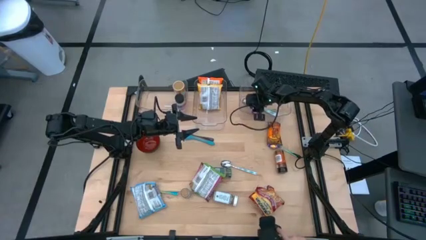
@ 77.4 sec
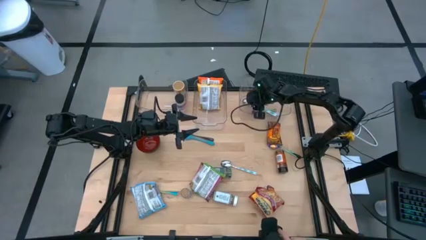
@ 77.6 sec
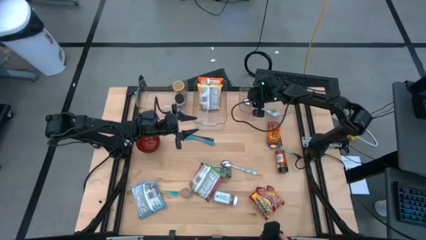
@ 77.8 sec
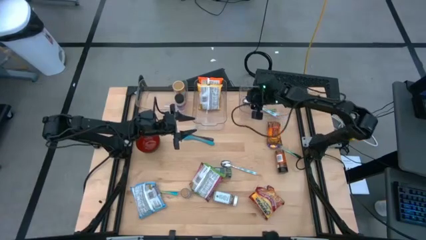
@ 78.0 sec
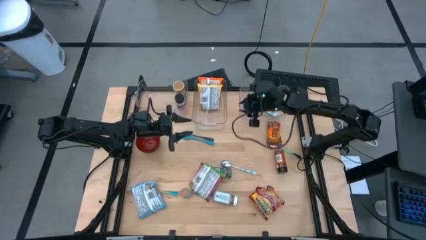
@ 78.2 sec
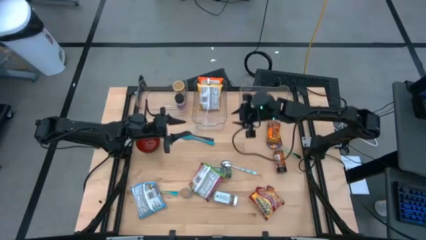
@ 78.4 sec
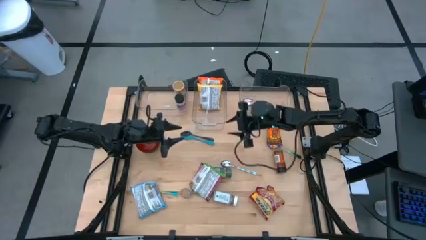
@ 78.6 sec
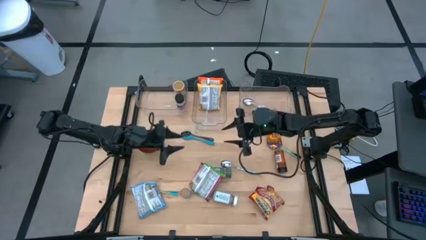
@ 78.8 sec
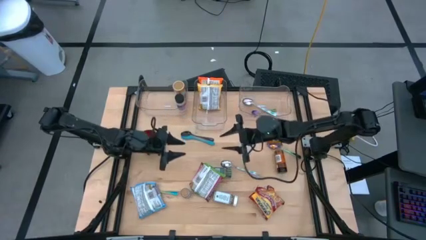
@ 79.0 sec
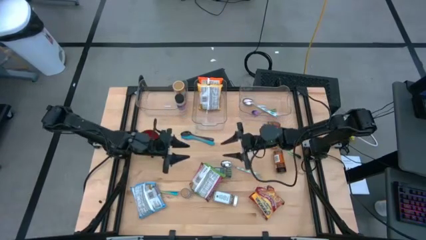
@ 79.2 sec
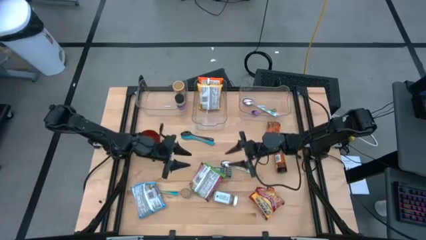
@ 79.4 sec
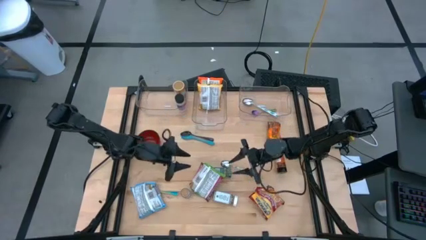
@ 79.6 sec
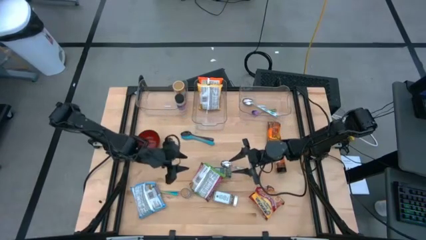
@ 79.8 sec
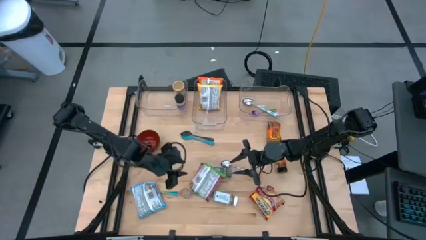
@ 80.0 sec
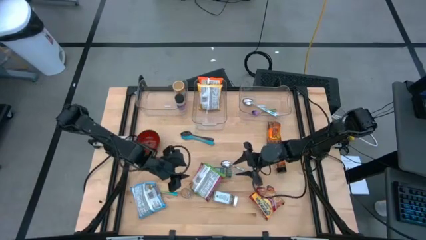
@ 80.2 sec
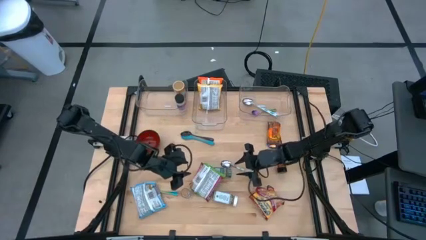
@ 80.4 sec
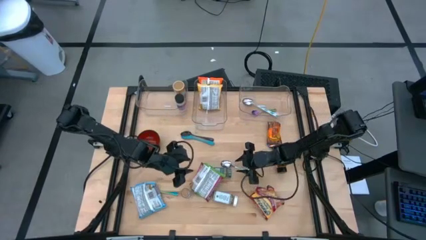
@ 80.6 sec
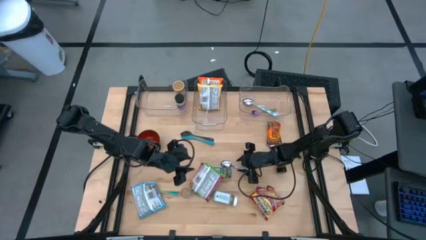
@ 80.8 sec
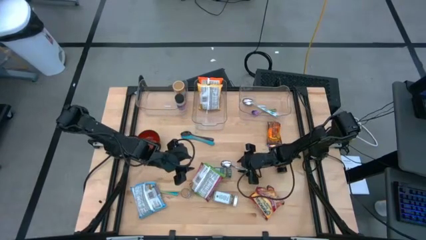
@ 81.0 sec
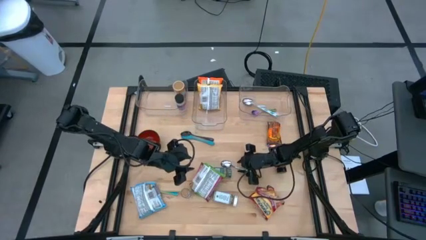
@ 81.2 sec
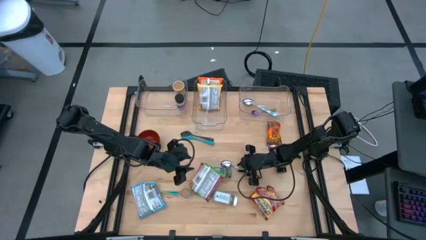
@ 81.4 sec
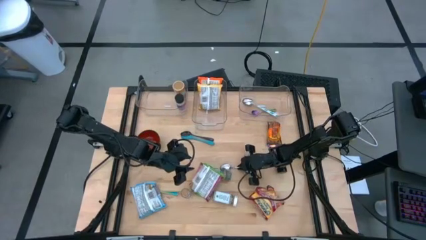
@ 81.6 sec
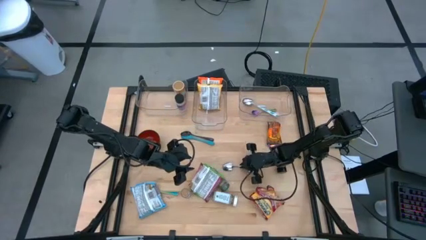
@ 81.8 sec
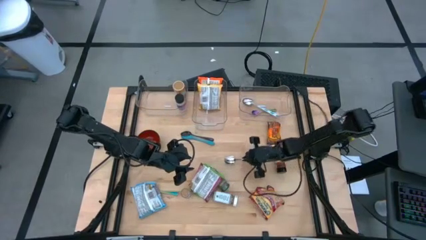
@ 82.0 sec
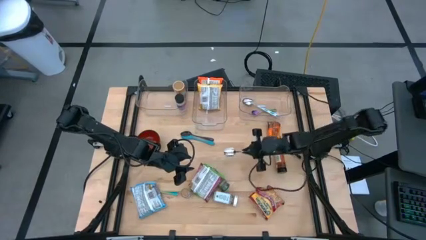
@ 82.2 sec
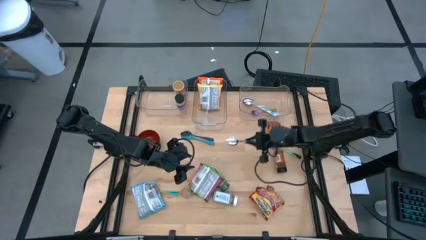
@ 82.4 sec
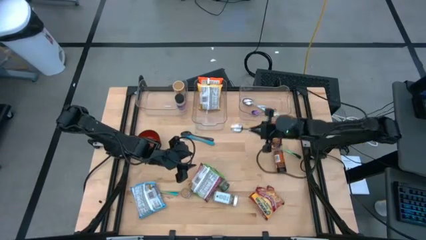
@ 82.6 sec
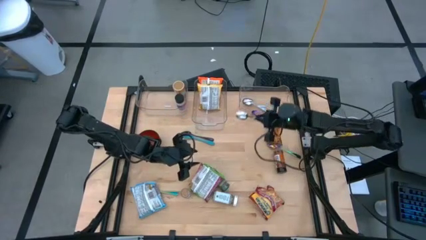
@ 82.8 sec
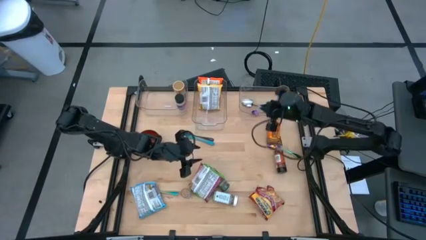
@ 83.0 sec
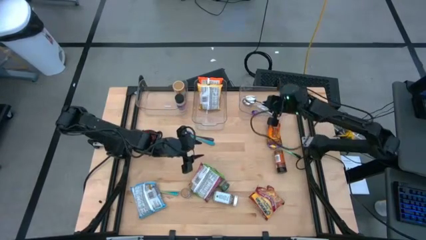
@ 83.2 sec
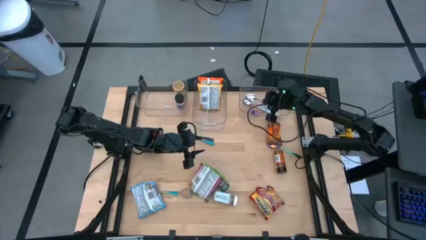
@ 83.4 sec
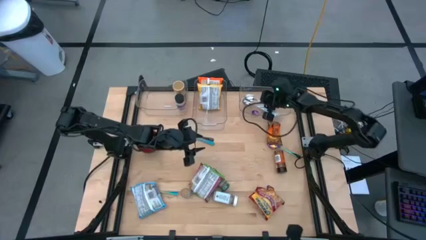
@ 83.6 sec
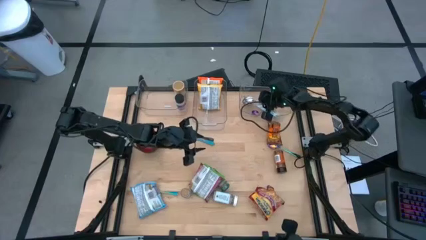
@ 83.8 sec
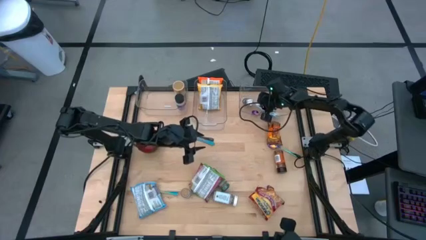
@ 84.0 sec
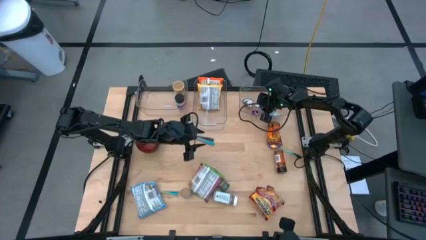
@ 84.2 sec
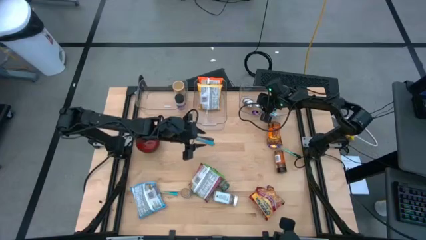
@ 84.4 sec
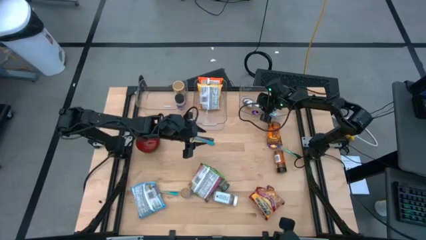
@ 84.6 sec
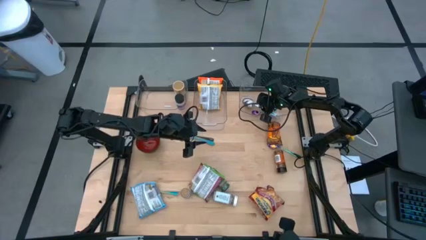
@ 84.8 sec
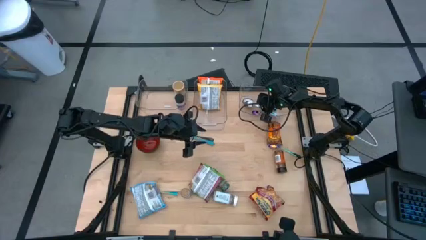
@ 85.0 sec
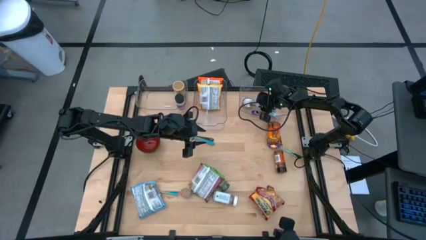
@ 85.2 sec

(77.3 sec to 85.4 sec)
Task: Pick & Place Food Item
Put the blue patterned spoon into the right transparent bin

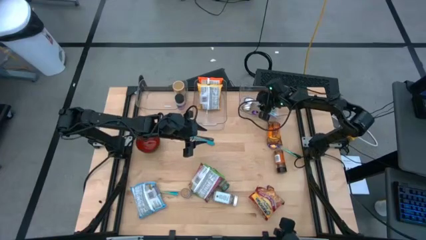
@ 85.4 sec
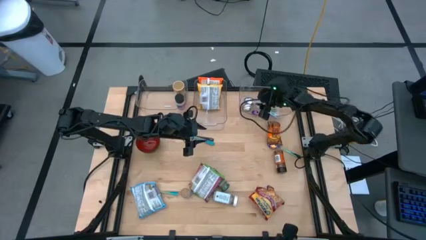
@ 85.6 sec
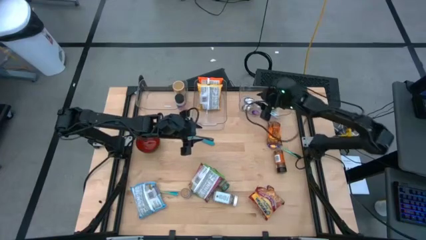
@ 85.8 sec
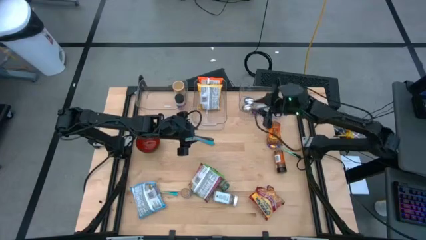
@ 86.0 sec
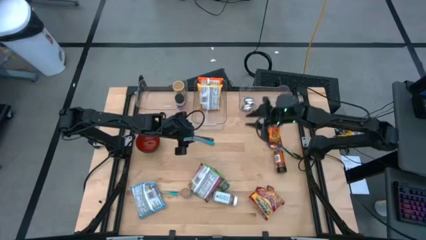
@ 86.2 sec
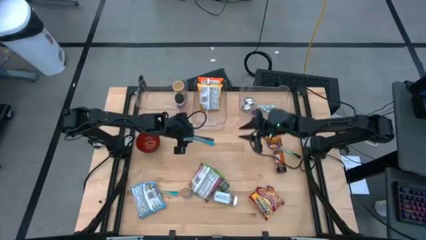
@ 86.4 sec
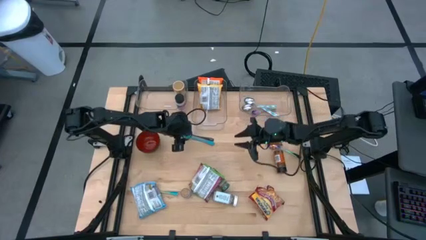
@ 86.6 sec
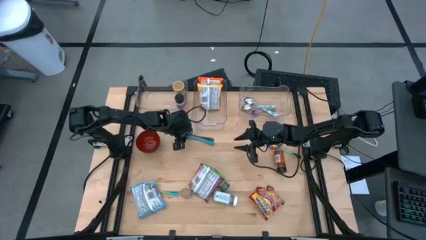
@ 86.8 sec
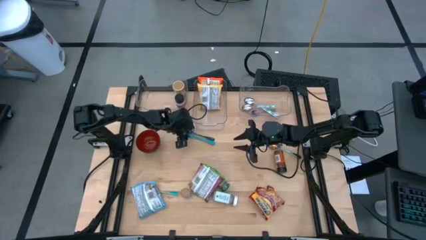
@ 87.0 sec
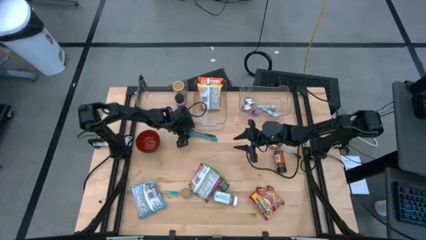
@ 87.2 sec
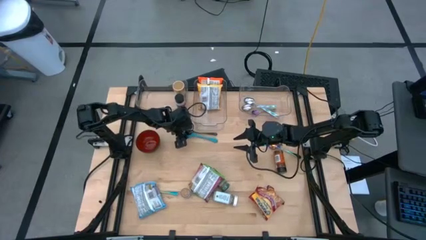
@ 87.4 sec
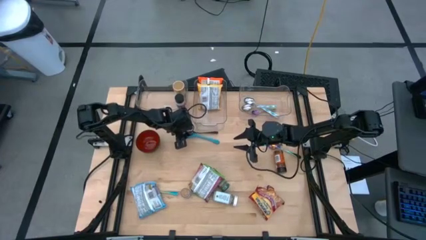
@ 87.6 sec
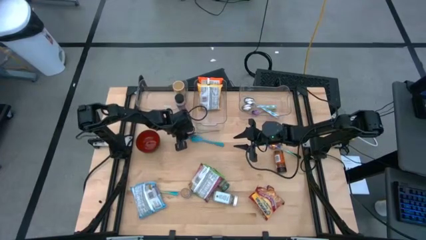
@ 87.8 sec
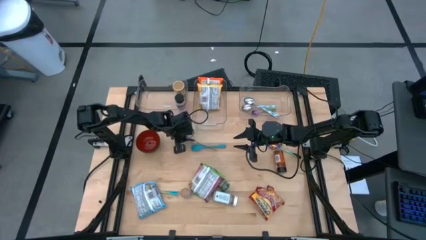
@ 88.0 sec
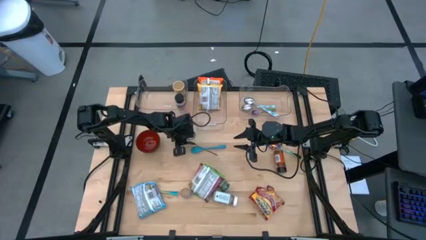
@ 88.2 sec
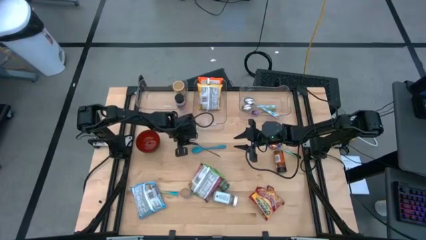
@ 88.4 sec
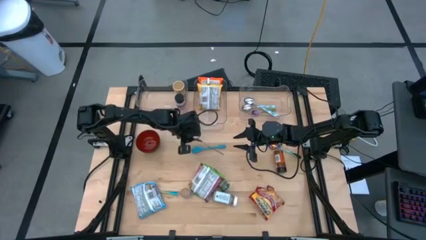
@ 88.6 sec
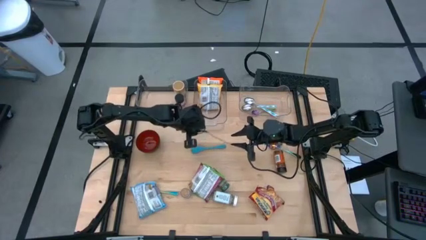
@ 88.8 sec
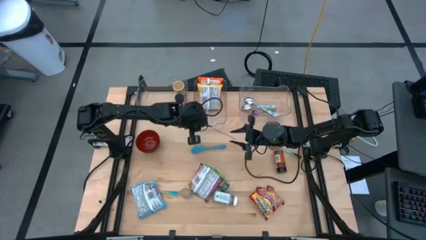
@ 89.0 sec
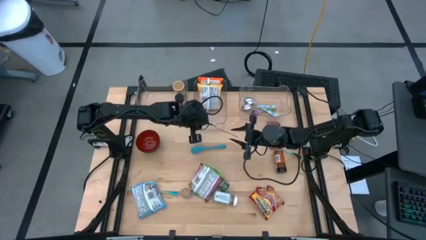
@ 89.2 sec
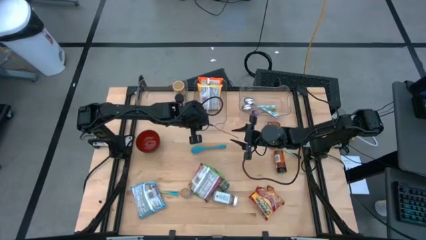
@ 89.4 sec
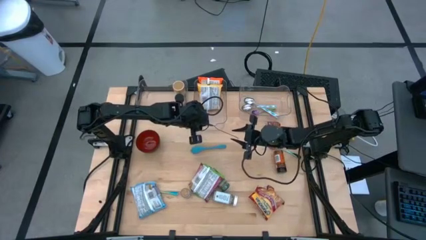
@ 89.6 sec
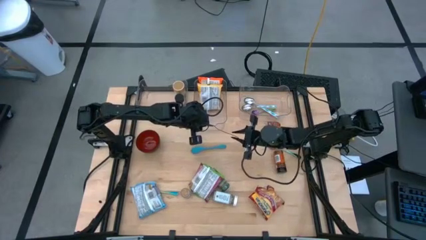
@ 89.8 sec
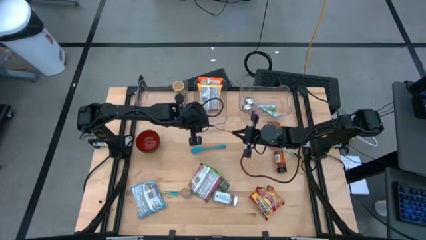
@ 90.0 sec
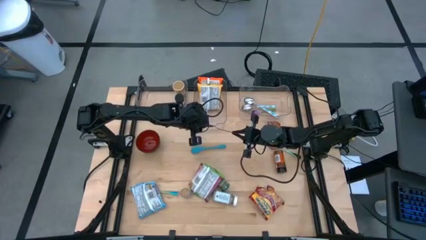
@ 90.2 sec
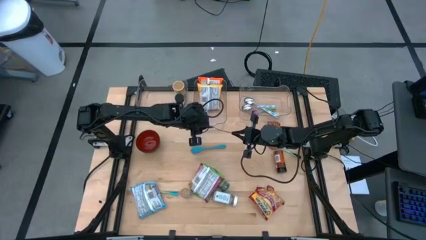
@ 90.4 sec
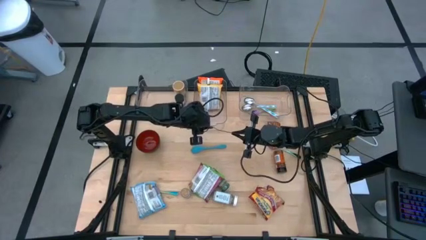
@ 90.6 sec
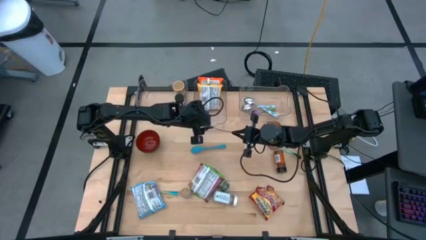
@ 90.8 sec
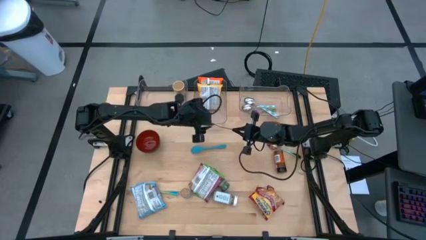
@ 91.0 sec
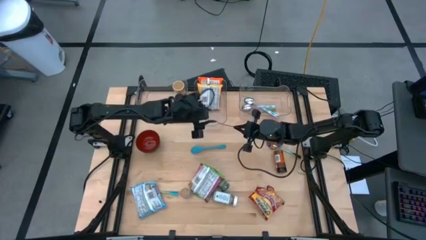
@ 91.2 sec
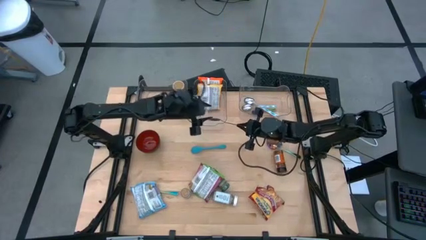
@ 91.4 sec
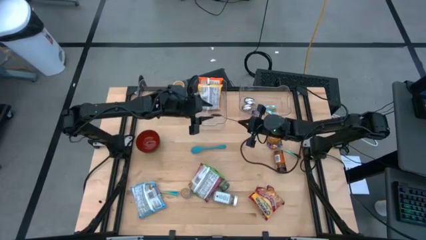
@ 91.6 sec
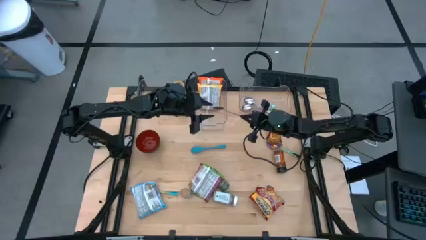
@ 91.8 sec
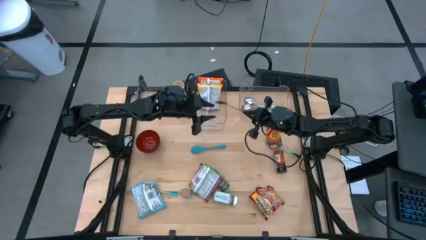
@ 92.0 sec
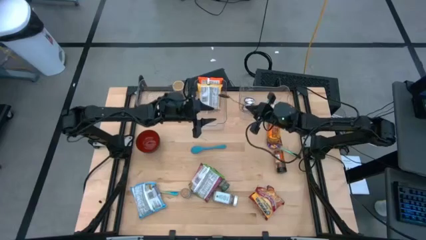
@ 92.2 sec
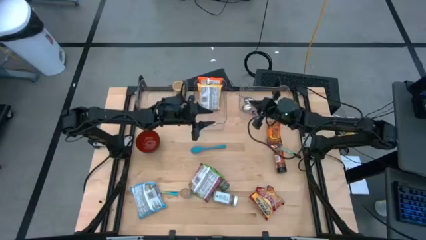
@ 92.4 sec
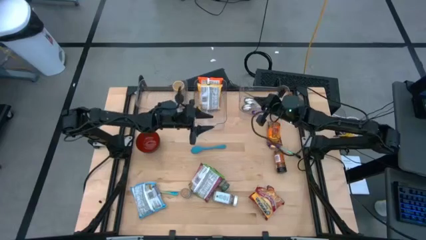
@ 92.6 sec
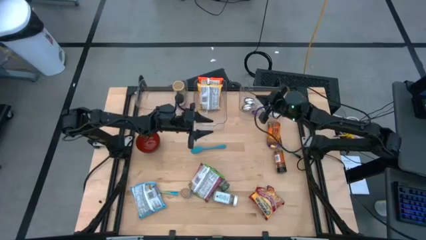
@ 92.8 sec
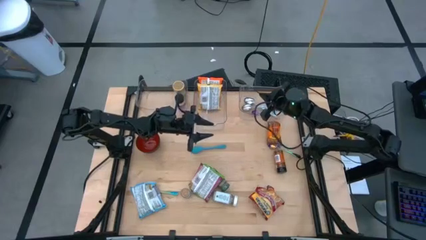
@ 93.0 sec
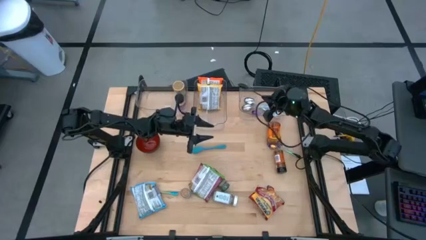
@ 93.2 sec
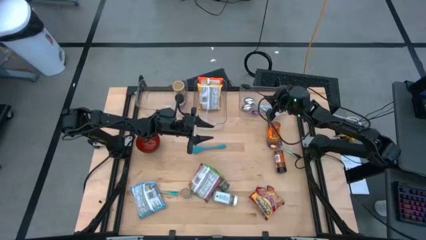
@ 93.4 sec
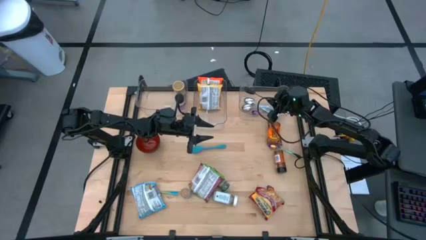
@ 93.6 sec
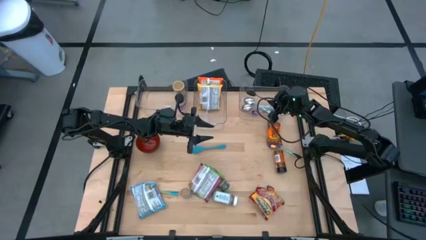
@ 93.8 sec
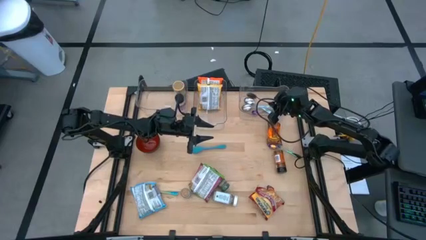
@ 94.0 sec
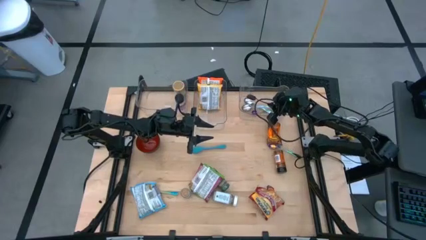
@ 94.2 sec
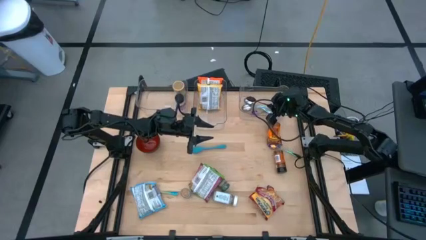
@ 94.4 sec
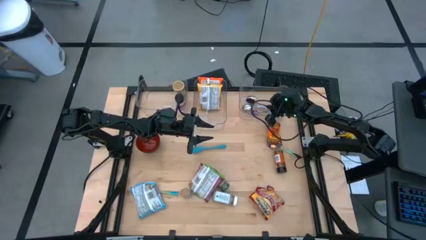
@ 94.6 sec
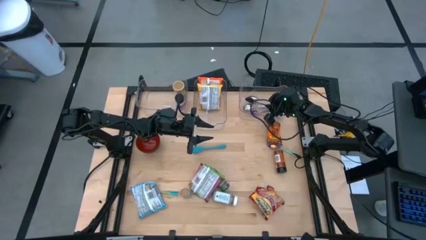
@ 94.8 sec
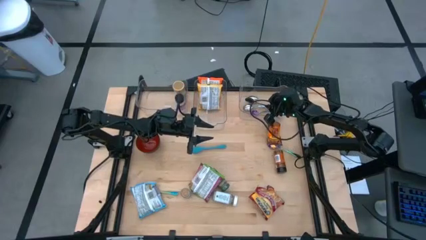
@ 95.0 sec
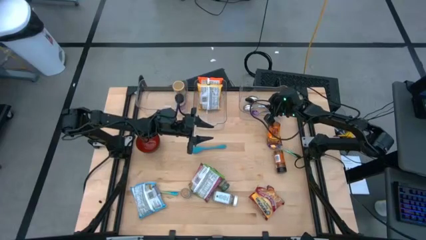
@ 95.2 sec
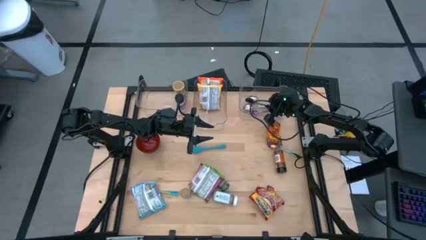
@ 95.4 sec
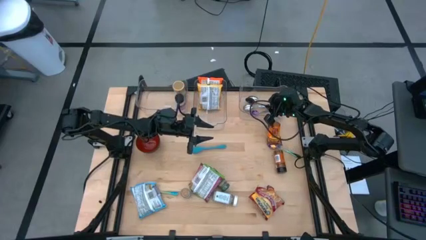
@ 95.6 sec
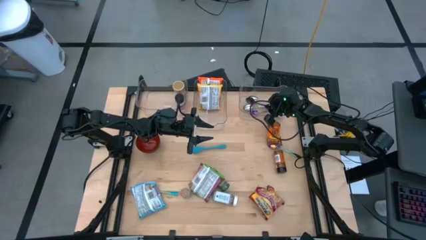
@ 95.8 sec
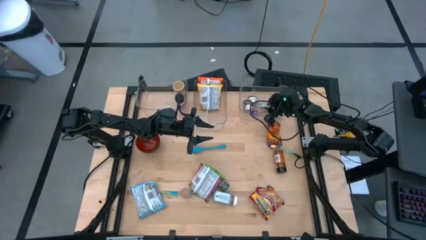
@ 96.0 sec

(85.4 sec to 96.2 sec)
Put the black spoon into the right transparent bin
